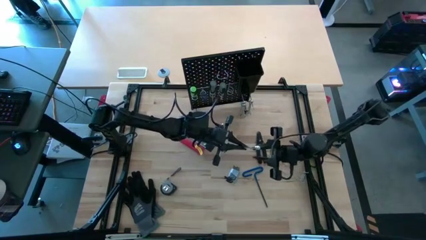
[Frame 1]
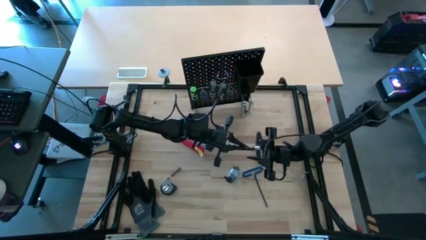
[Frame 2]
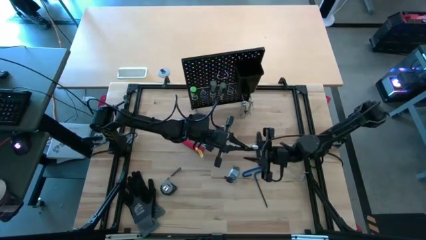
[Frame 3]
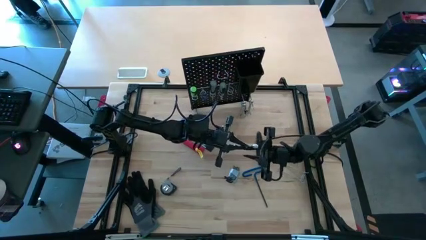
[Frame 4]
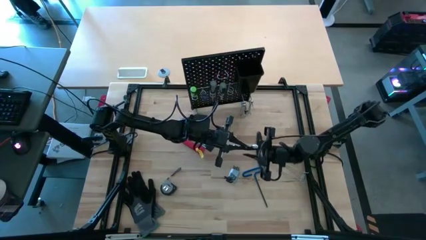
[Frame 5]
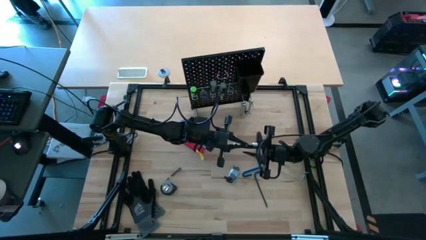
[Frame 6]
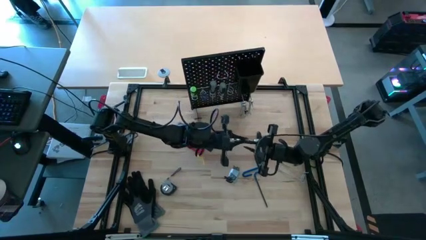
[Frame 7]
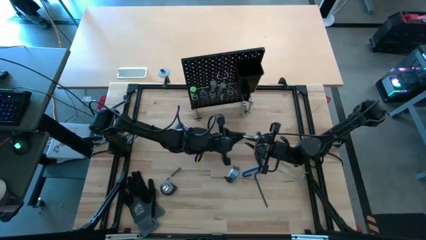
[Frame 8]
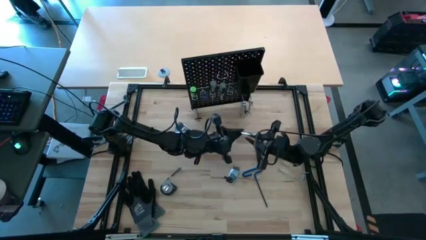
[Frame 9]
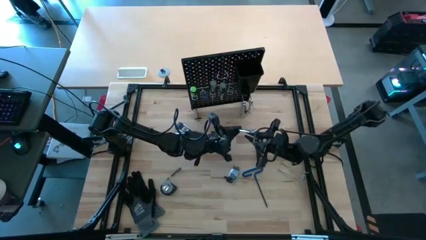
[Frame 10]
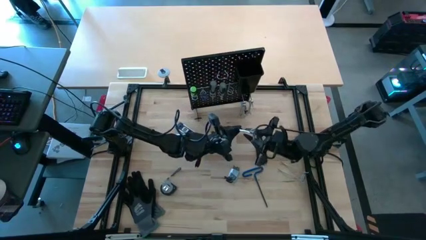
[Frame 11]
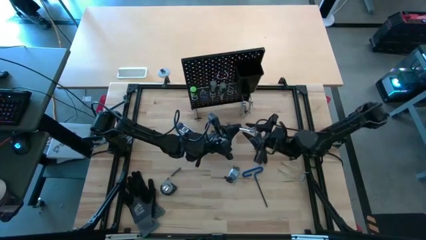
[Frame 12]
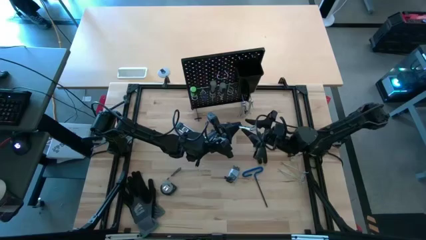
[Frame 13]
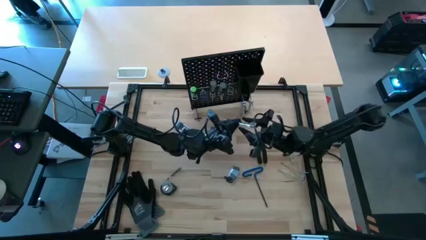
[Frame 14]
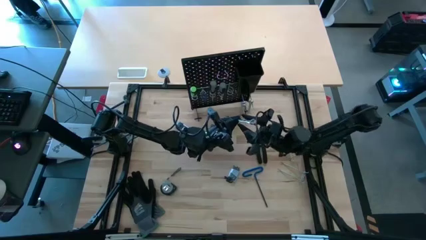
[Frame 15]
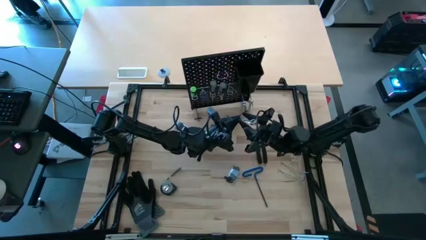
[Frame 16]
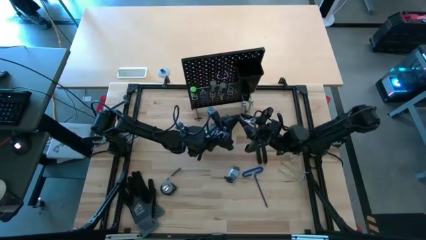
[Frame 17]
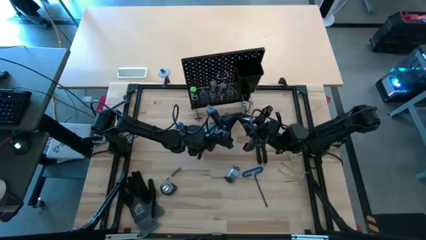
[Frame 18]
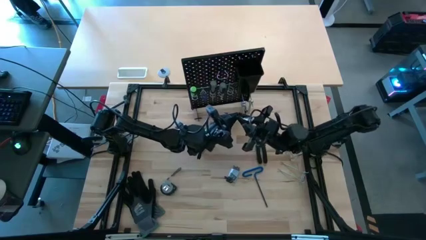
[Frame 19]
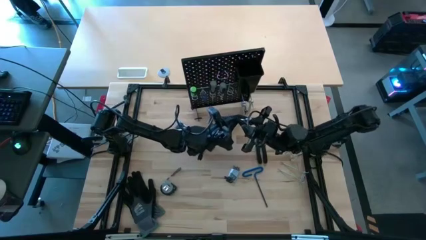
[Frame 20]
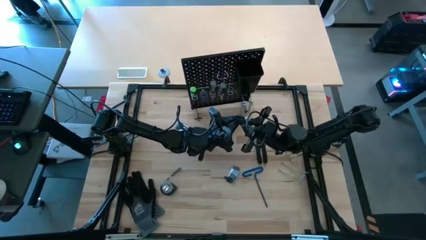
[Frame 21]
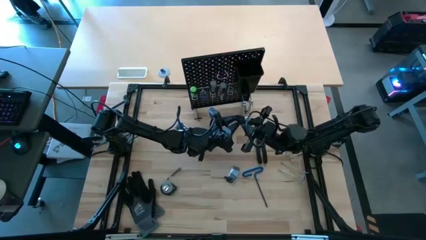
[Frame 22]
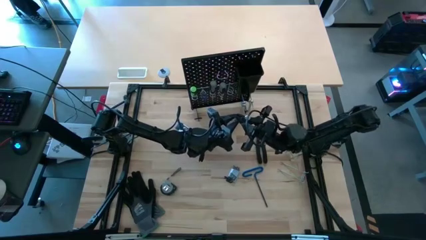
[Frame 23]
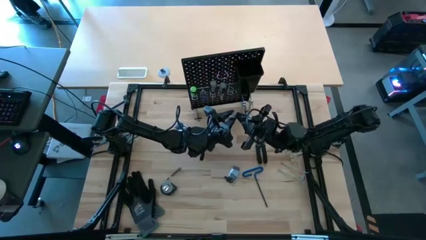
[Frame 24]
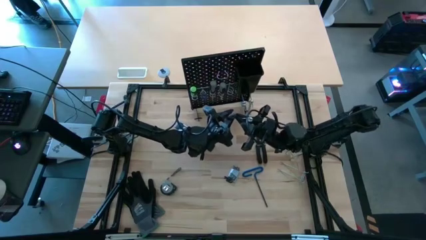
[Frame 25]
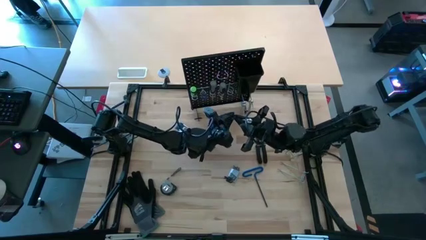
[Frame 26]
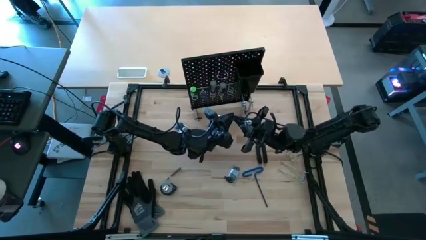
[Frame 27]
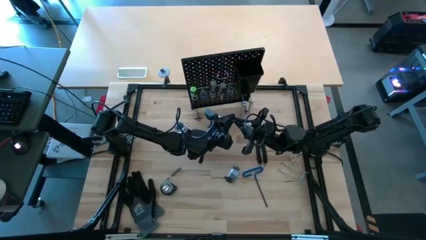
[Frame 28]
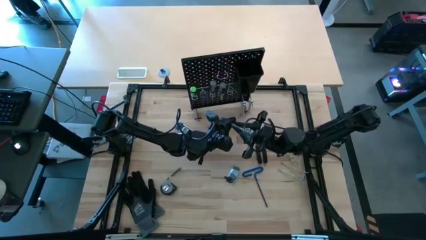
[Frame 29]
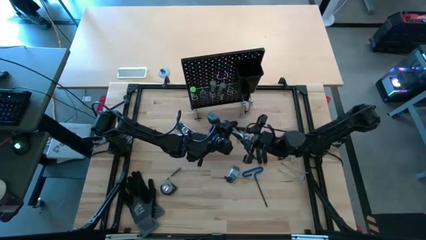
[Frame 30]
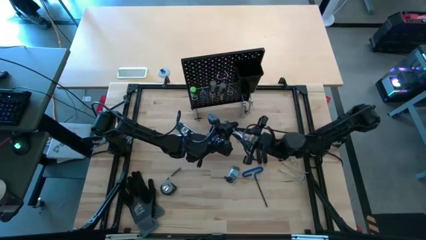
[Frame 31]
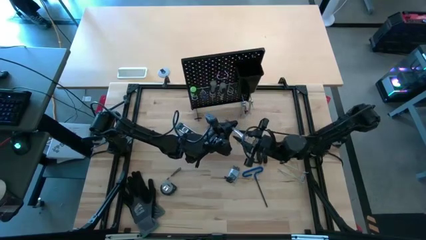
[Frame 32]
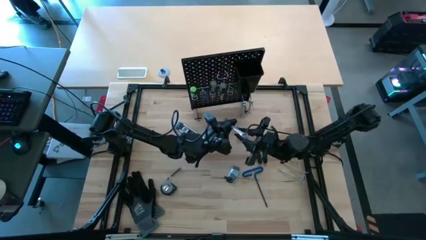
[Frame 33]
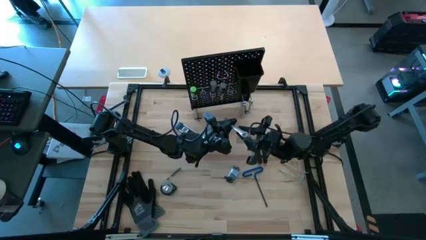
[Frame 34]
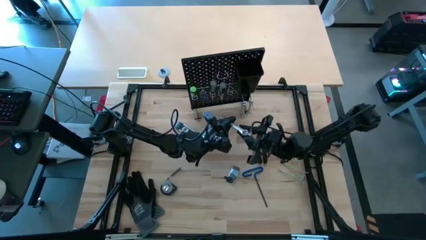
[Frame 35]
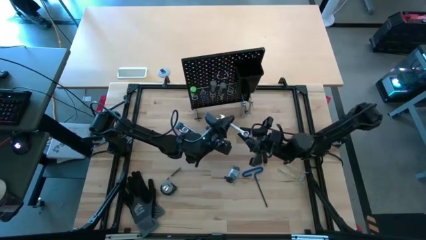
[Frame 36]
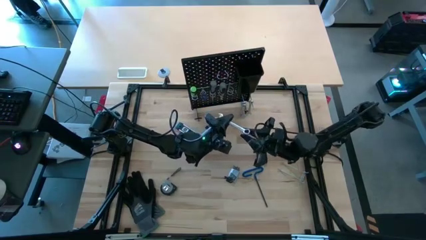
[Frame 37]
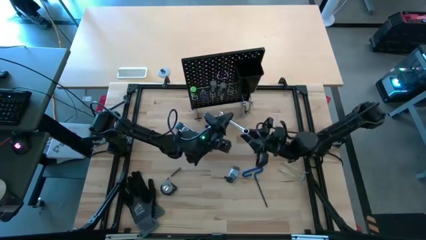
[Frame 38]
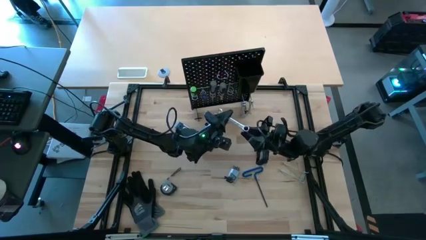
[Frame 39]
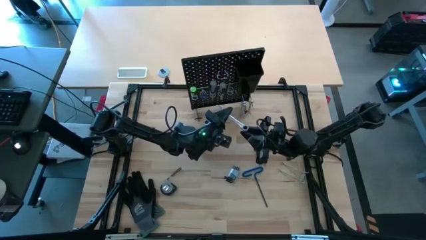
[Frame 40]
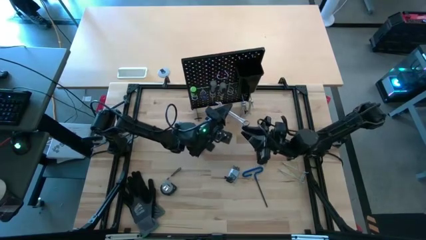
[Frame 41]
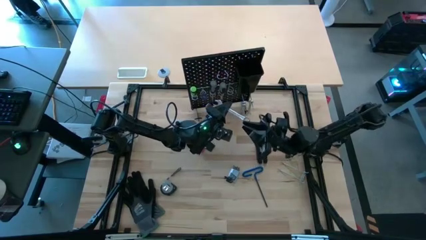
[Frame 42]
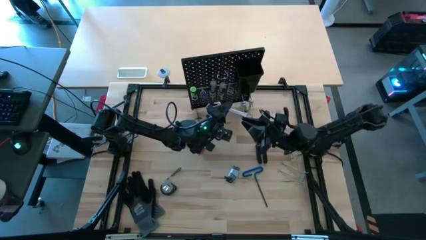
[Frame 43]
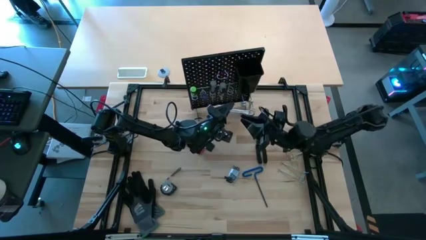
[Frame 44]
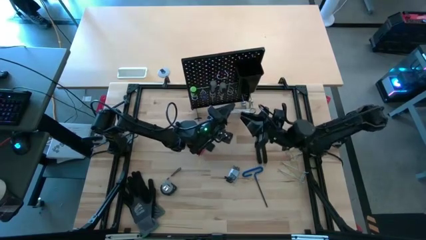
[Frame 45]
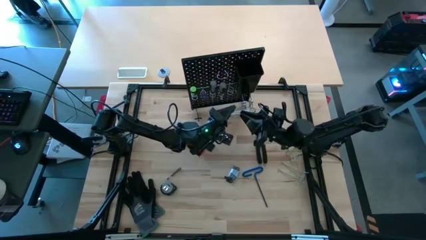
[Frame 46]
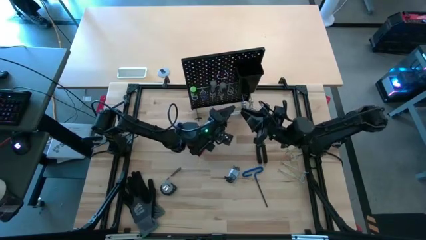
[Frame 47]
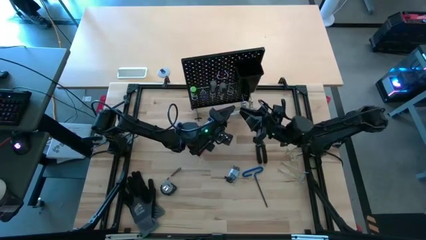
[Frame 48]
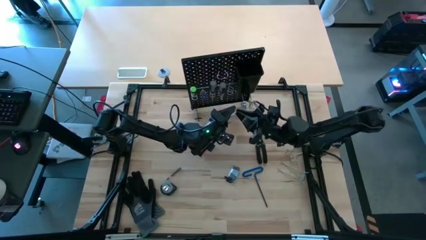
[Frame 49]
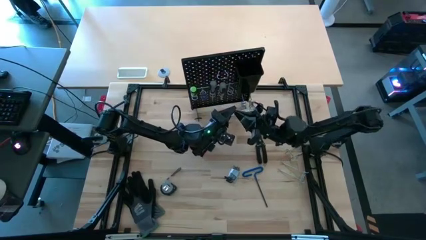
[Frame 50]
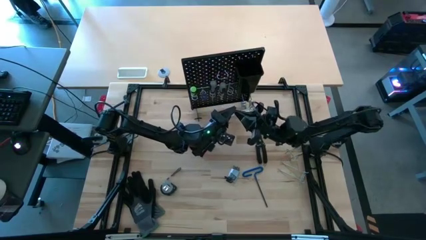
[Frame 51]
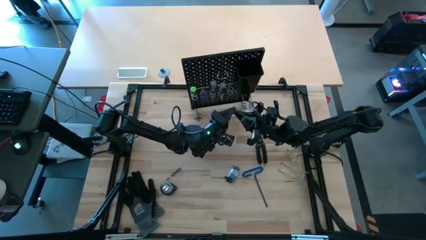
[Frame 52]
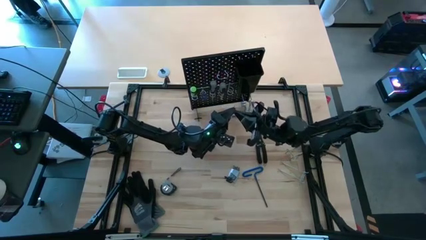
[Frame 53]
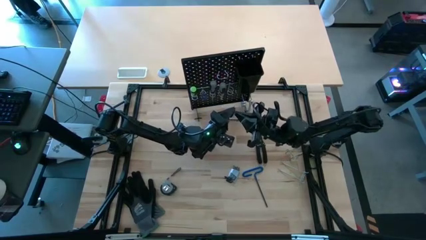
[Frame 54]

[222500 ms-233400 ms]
Task: Hang tools onto peg board
Hang the wrench onto the pegboard

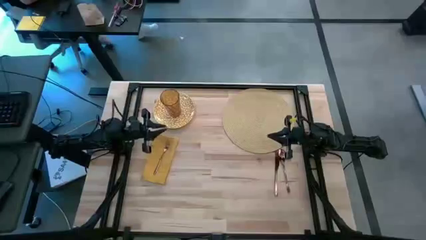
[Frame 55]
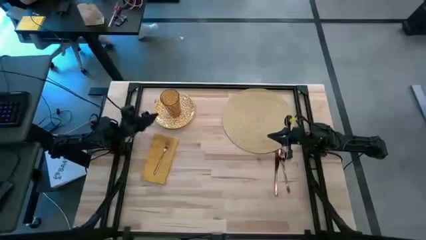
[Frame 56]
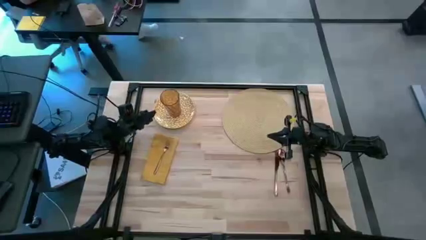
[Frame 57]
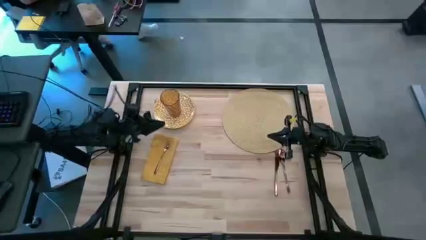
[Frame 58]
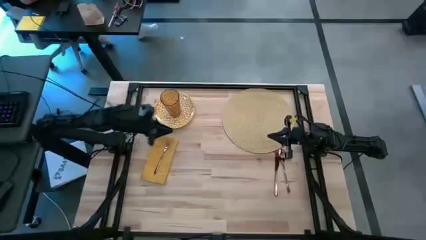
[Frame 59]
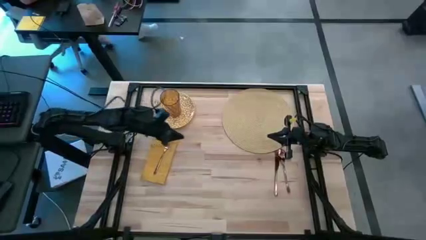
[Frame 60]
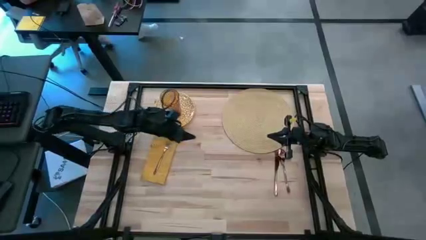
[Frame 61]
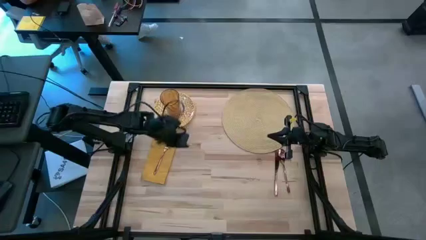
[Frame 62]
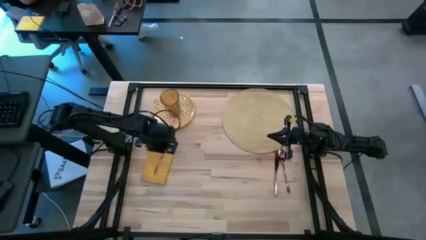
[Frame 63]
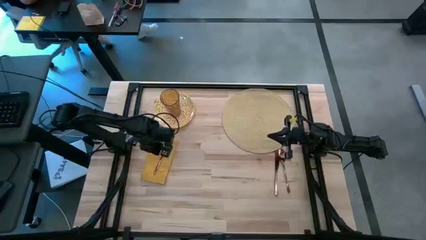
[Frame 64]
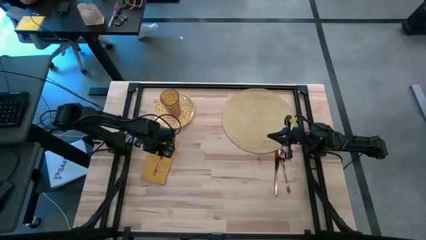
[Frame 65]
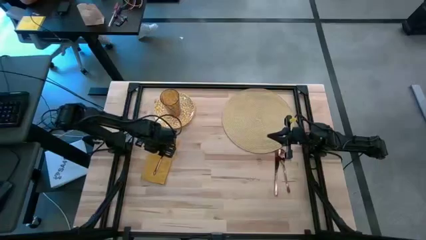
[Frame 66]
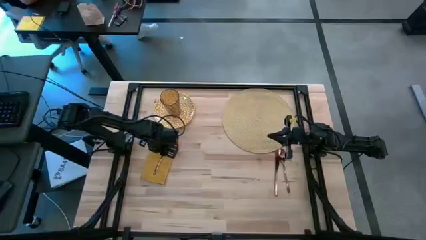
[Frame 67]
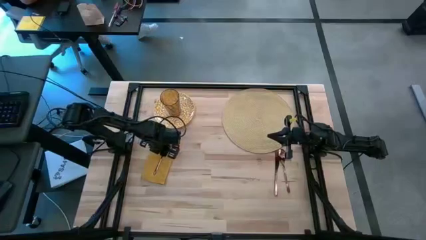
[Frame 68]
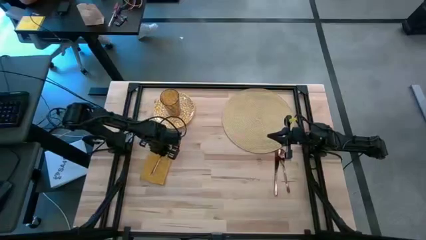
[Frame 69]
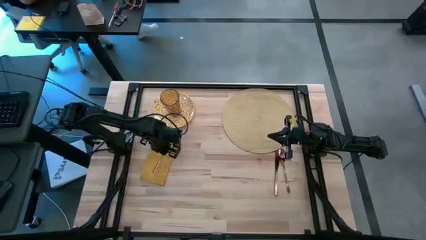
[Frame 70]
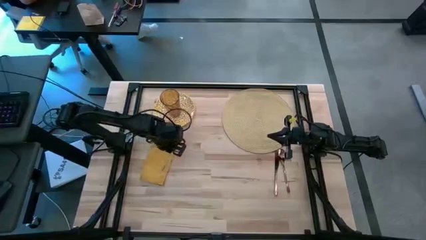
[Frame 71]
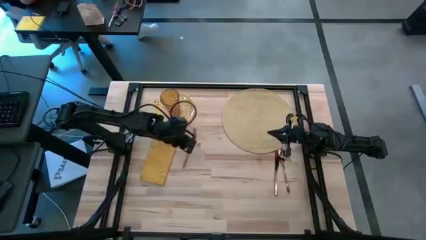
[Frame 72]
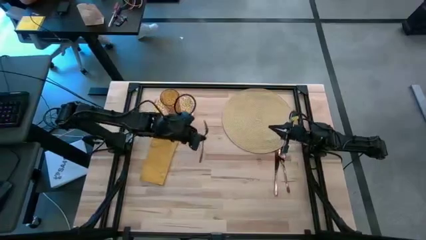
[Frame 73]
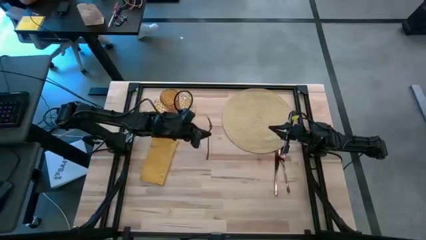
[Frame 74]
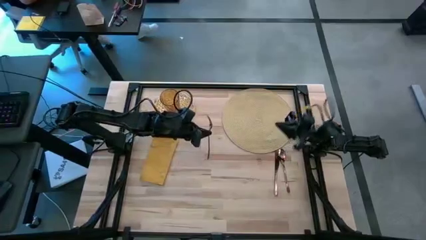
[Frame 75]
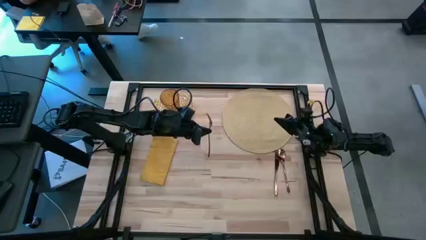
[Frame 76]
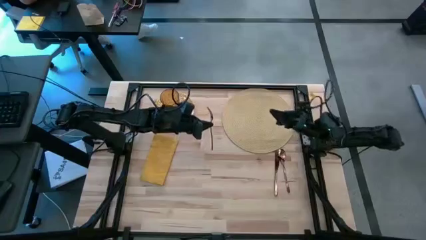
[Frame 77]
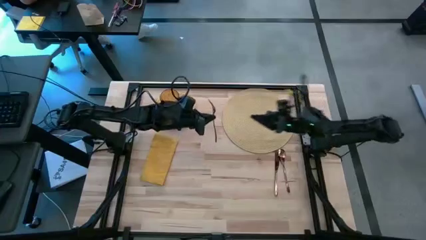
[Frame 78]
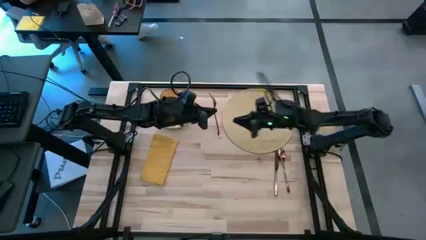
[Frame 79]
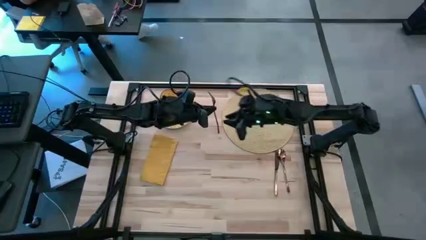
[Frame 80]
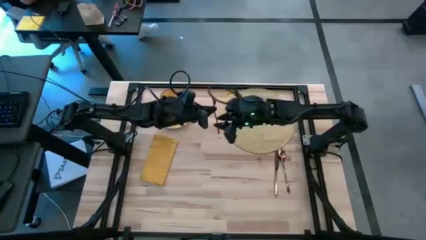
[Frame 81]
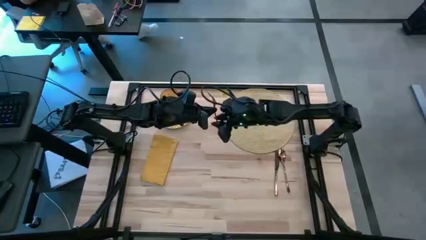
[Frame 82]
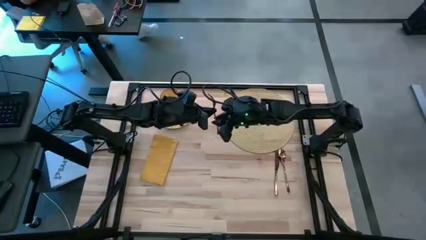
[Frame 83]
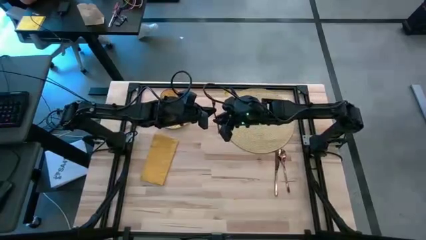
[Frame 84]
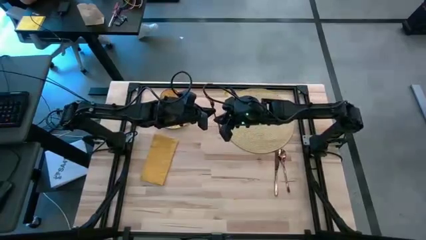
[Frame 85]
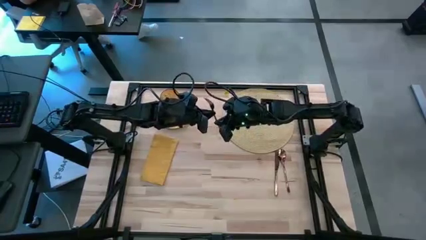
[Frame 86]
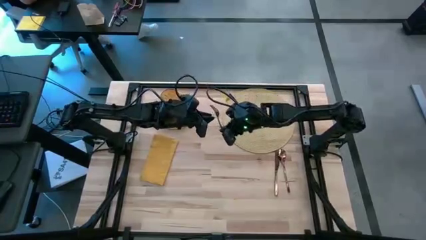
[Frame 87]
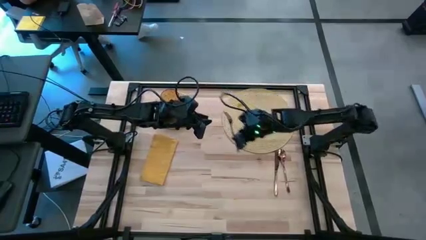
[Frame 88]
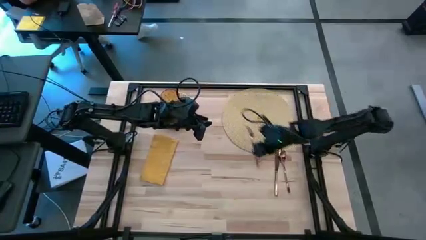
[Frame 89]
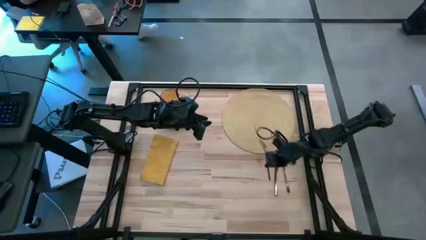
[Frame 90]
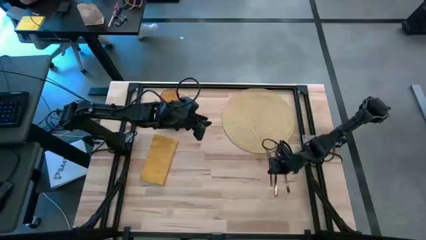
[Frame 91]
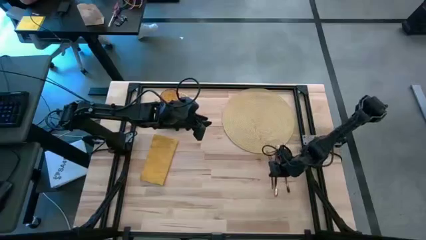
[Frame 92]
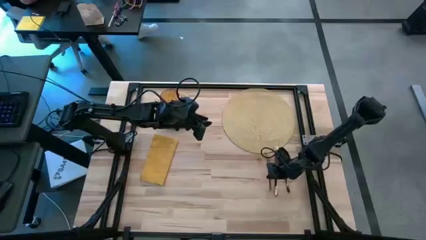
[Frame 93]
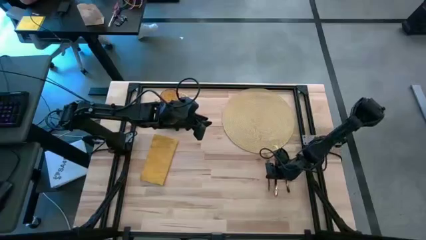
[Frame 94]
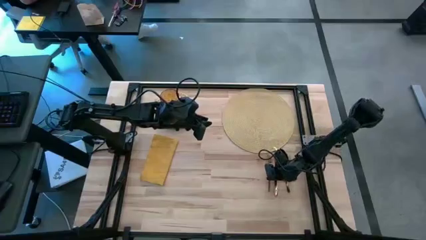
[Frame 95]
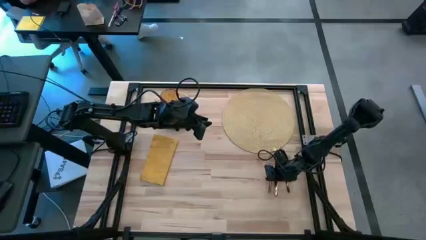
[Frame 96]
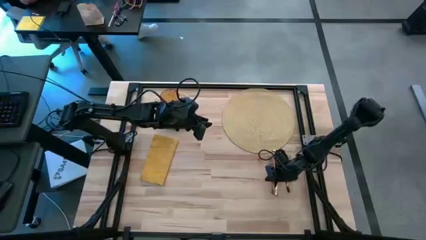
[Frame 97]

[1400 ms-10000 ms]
Task: Set table place
Move the bronze fork to the left of the bronze knife
